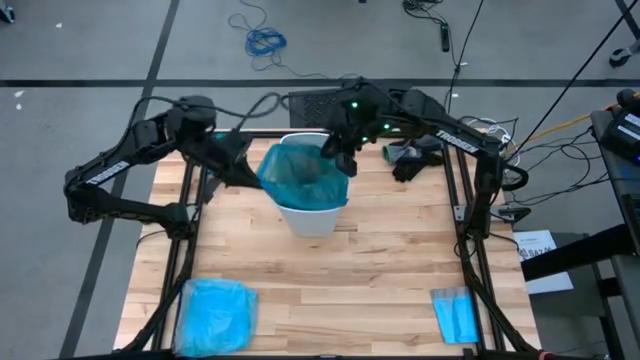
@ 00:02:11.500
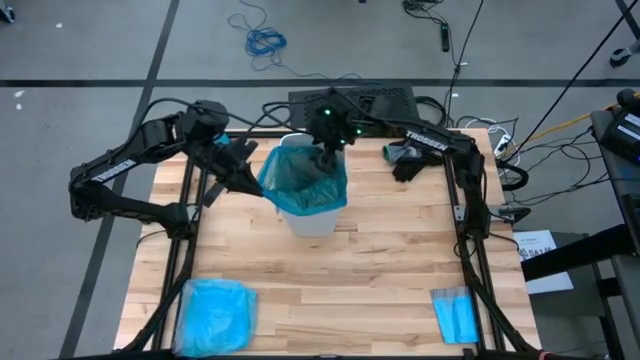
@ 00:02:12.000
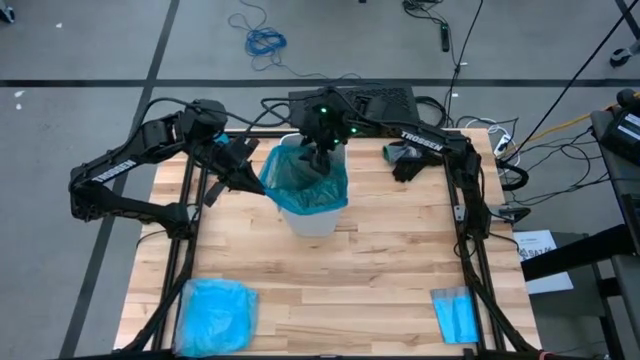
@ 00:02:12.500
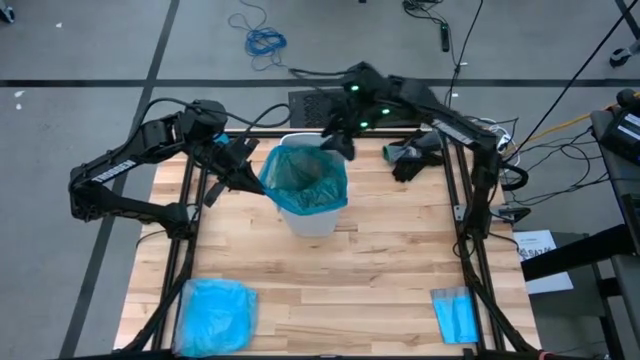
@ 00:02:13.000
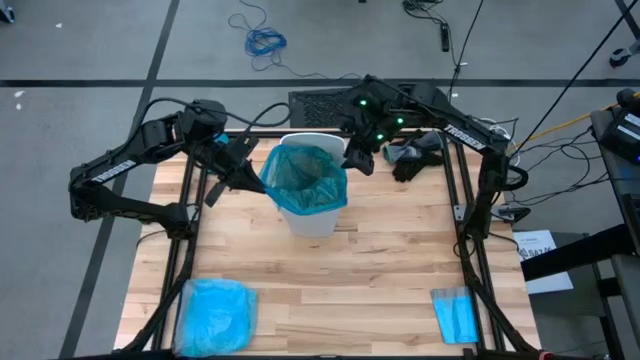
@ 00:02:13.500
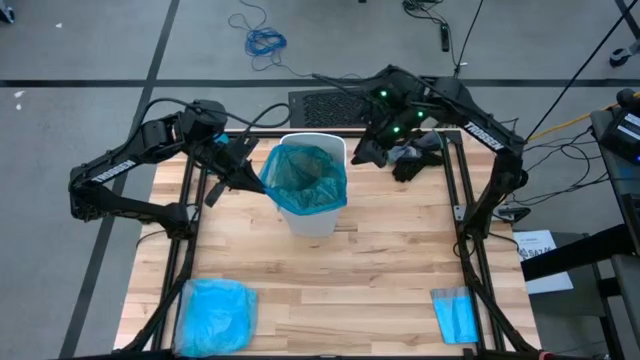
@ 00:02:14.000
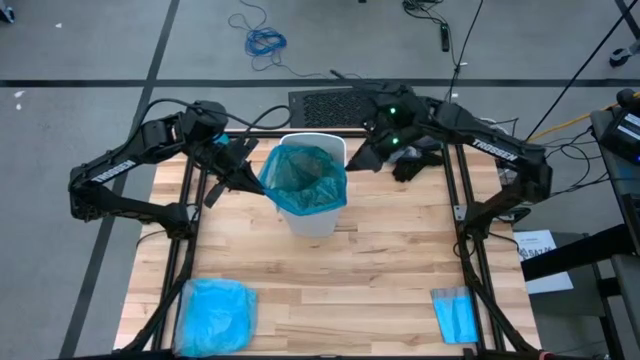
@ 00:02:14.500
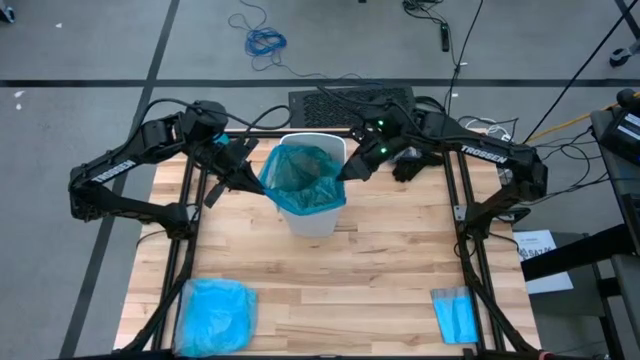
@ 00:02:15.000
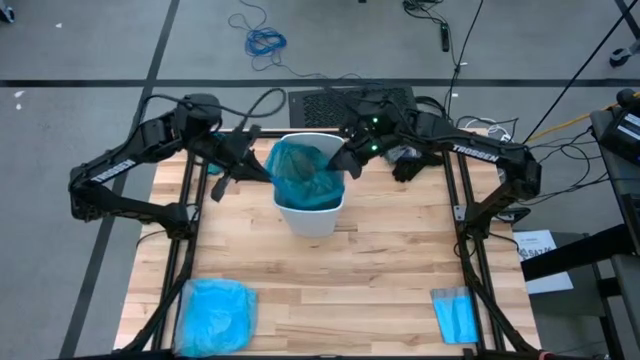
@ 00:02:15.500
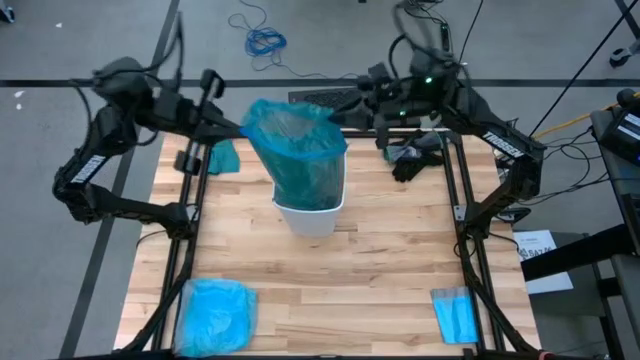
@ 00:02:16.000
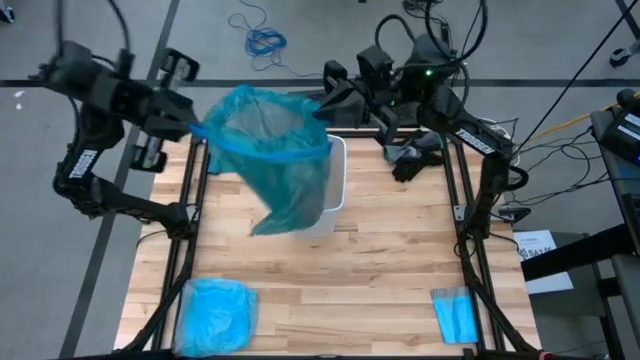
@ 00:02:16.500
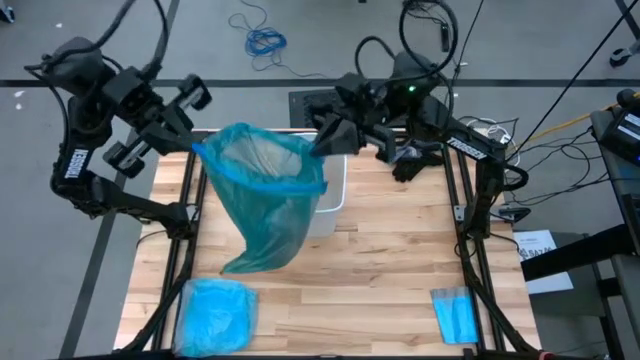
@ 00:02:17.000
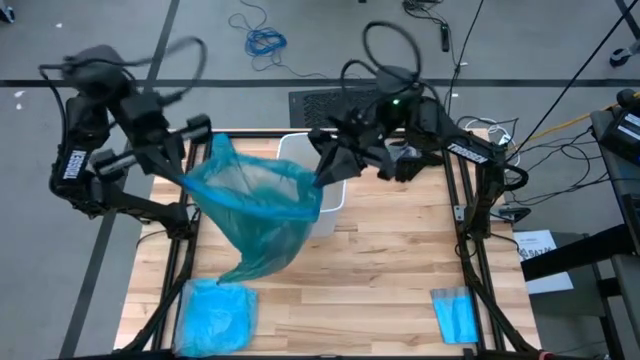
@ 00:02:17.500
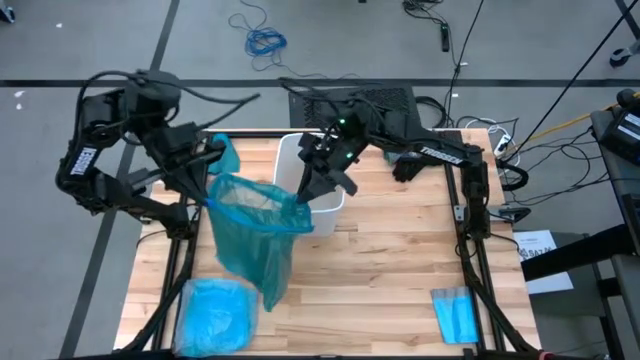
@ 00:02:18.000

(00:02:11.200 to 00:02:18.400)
Task: place trash/remove bag and relplace
Remove the blue trash bag from the trash bin

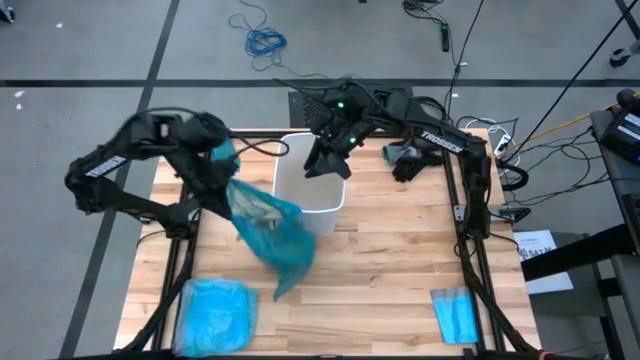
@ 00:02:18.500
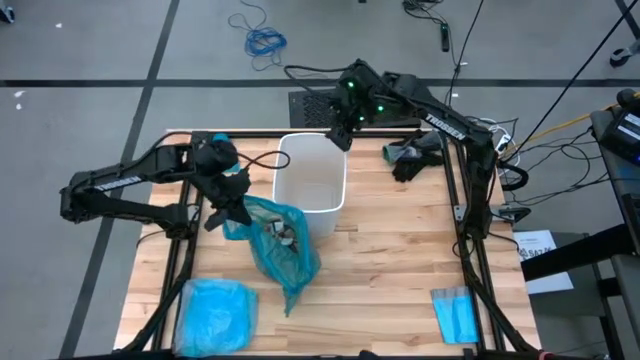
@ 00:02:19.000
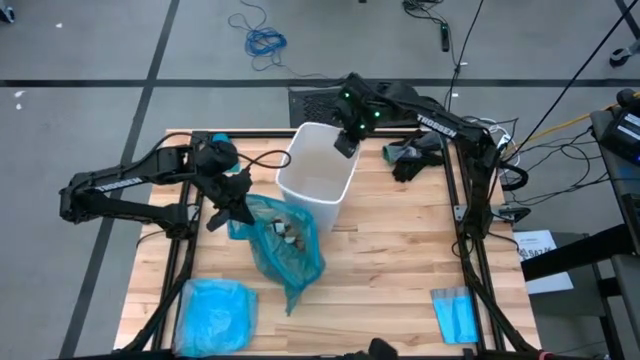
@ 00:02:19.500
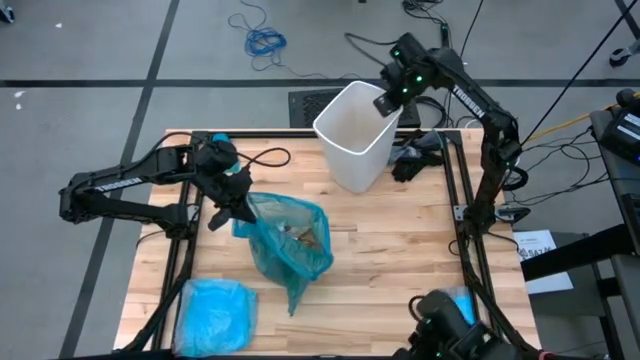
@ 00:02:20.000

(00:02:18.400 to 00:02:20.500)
Adjust the trash bin

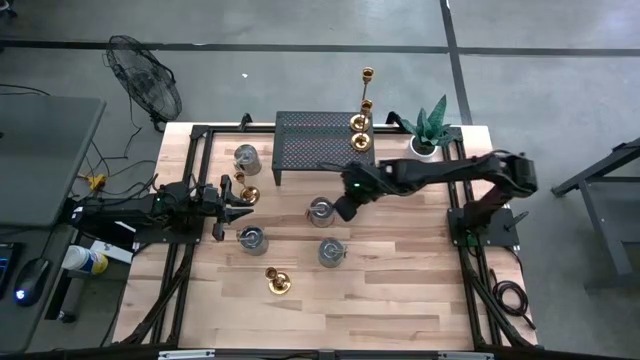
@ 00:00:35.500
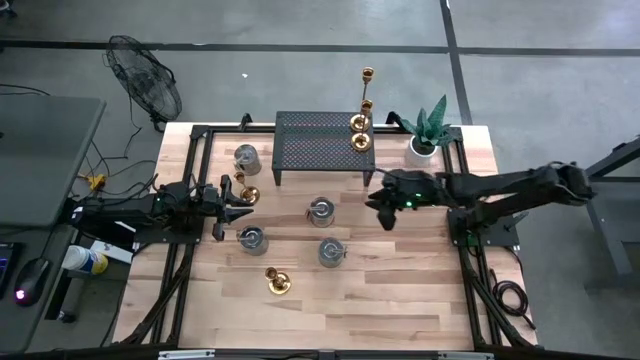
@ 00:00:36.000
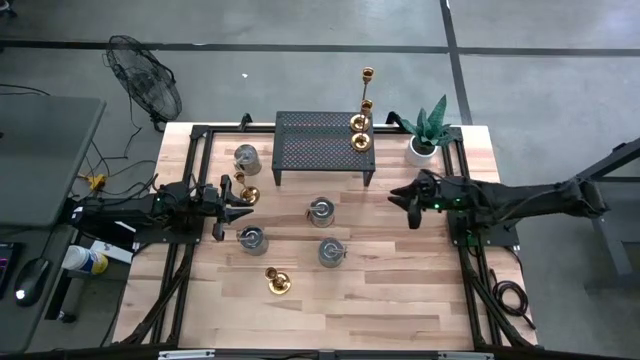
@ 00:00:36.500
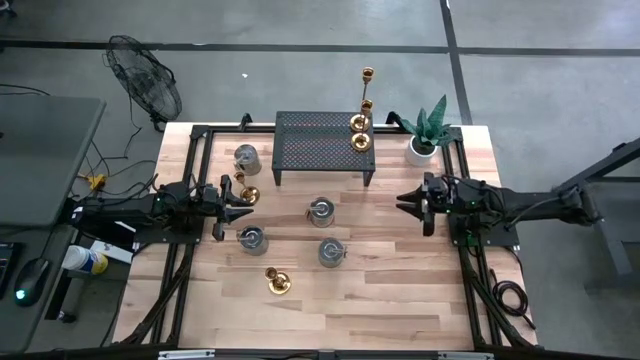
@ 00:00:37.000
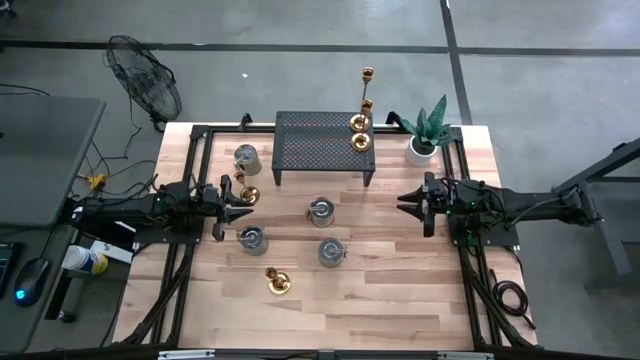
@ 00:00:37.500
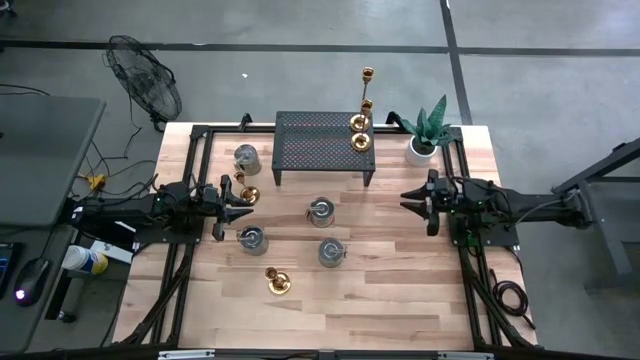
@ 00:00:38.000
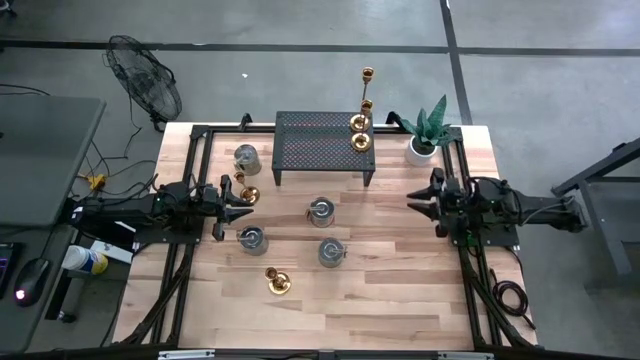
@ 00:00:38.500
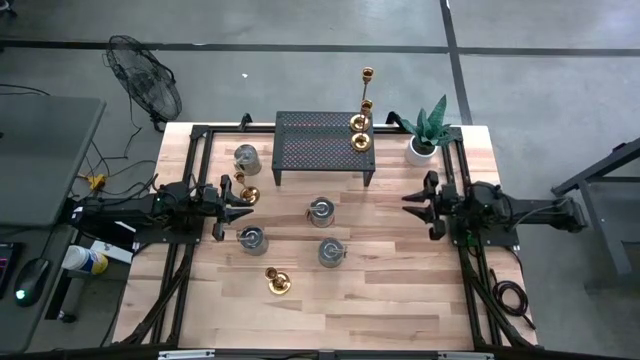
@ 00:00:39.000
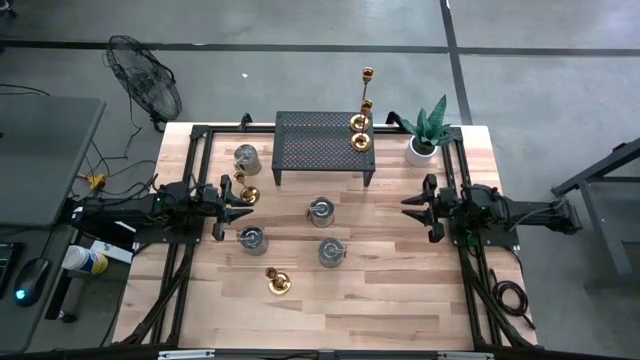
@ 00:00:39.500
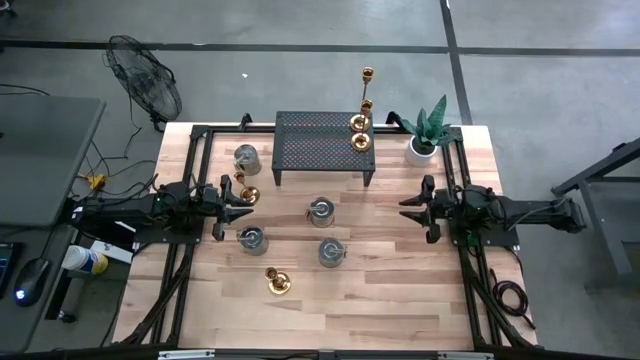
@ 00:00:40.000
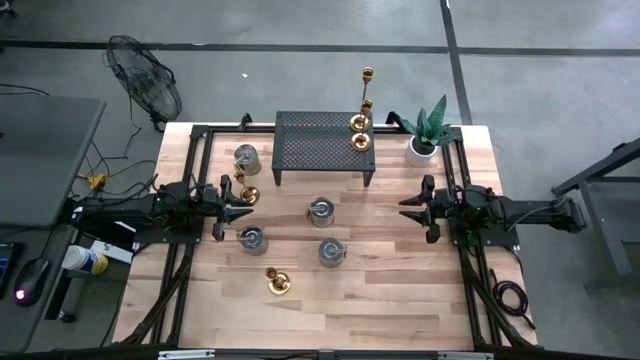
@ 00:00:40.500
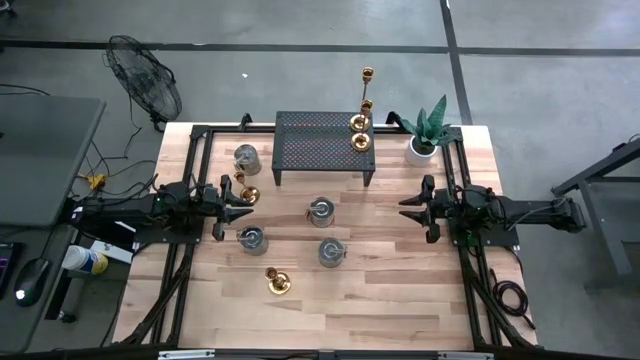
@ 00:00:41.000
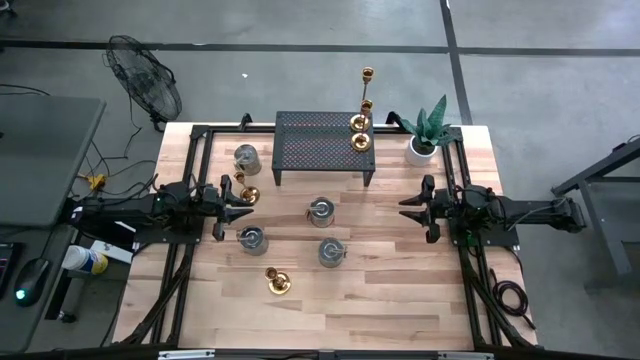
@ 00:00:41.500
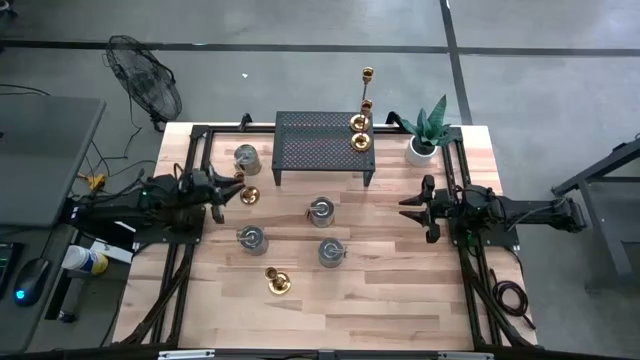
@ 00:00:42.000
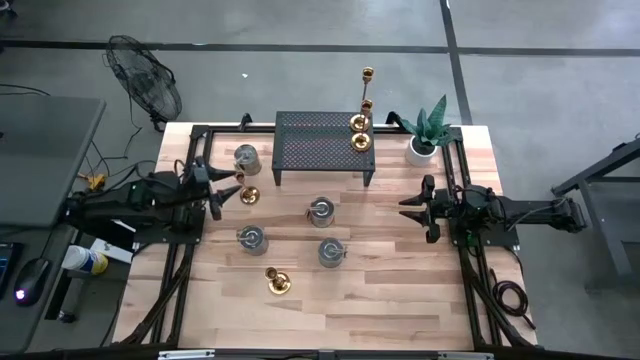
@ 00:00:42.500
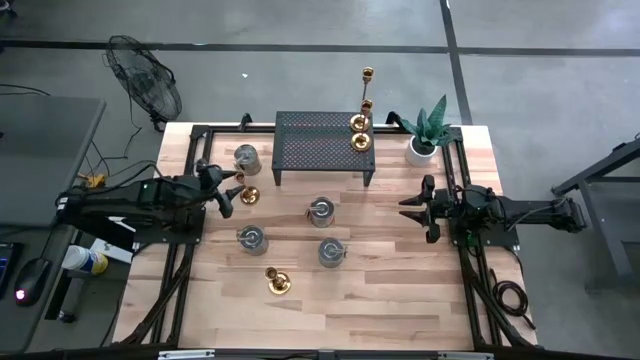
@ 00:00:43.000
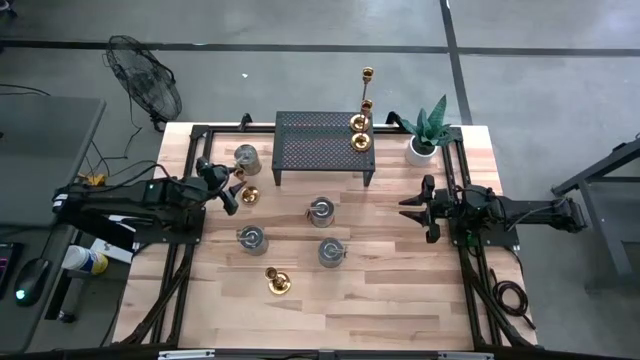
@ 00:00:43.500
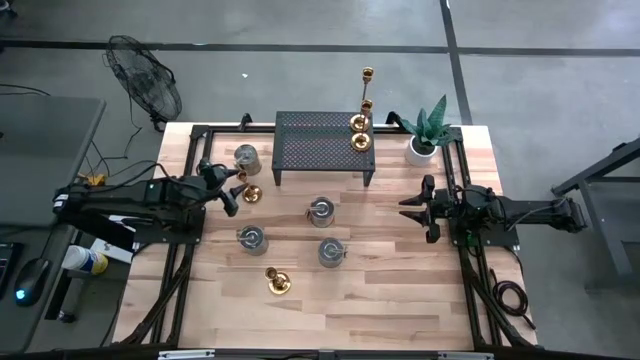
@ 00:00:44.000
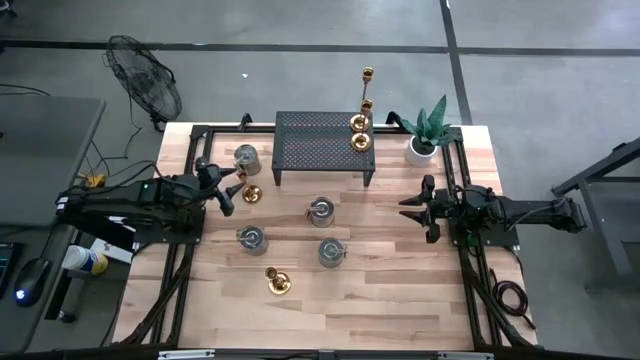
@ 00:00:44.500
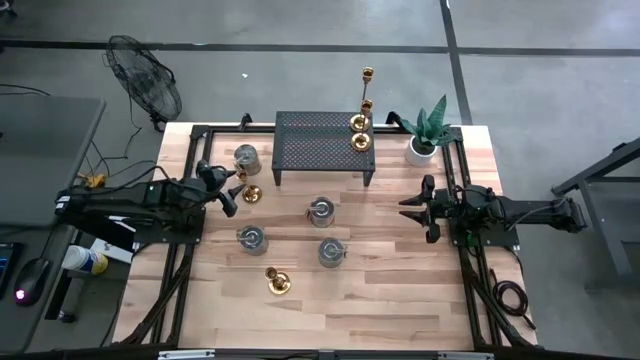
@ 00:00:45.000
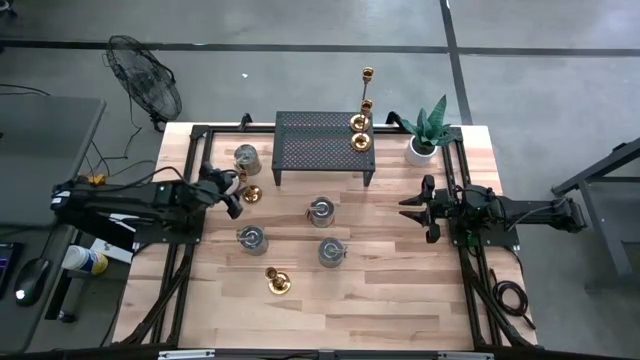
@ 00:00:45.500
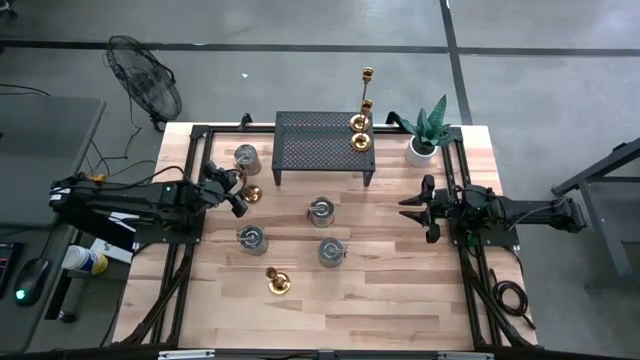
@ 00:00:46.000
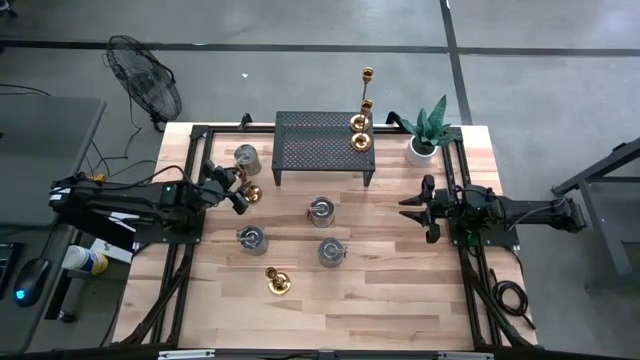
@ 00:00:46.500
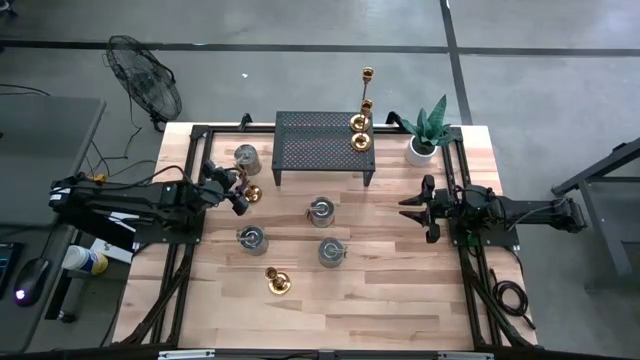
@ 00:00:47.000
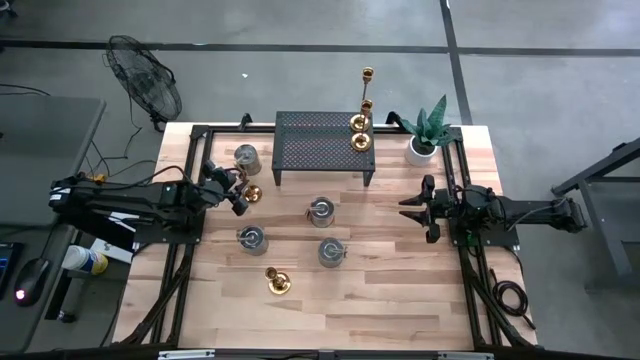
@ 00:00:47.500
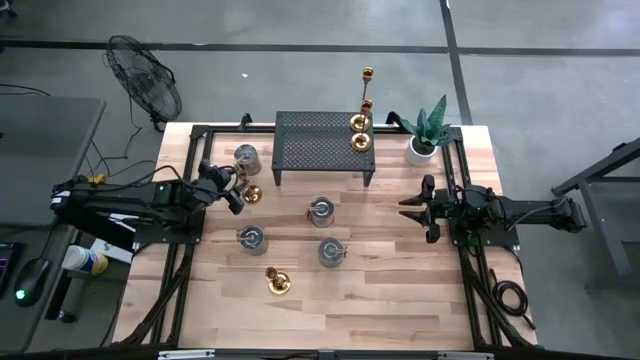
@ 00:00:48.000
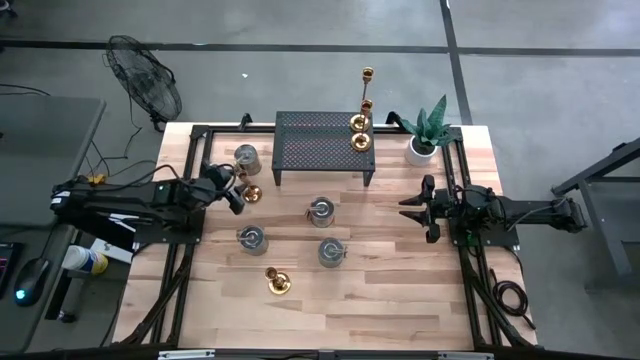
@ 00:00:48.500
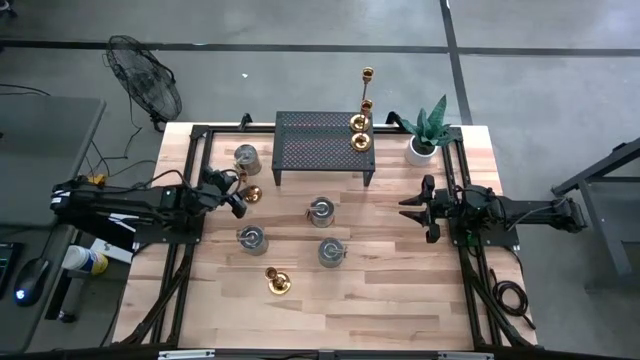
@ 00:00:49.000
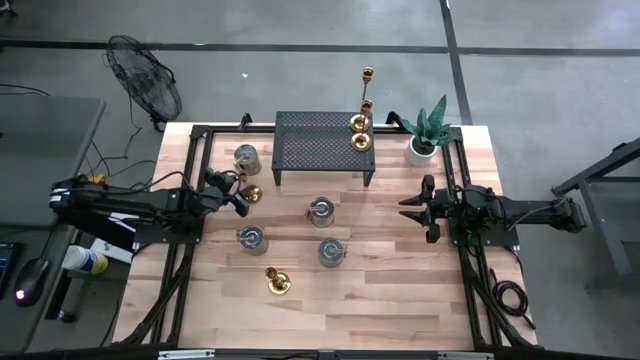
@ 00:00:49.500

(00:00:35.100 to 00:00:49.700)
Task: Pick & Place candle stick holders
Put the gold candle holder on the shelf
